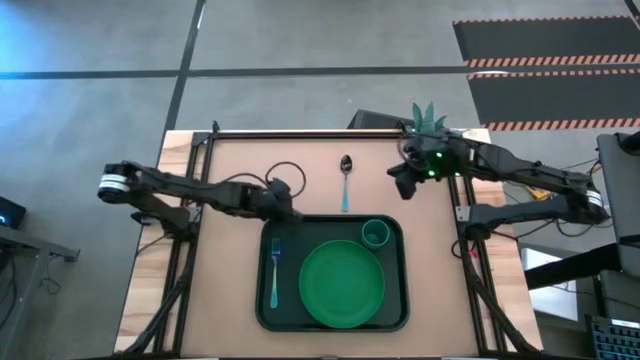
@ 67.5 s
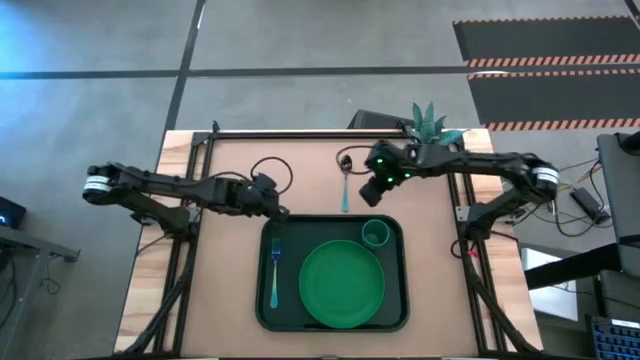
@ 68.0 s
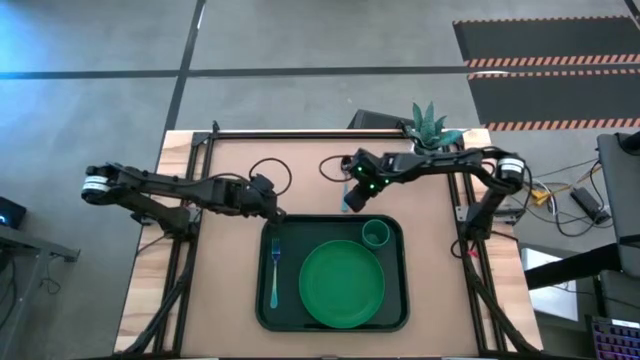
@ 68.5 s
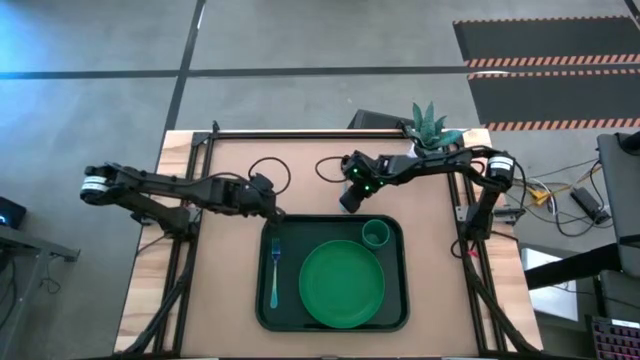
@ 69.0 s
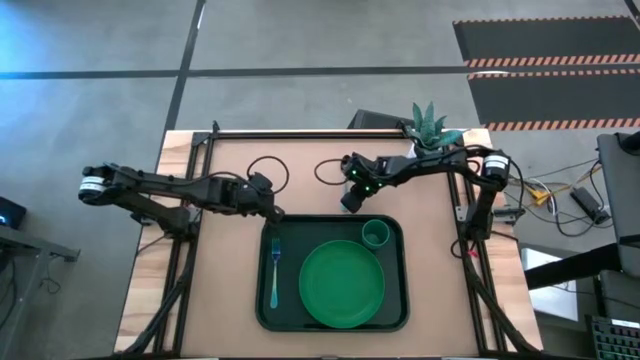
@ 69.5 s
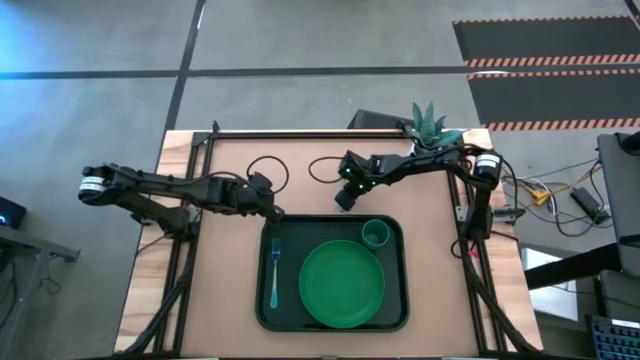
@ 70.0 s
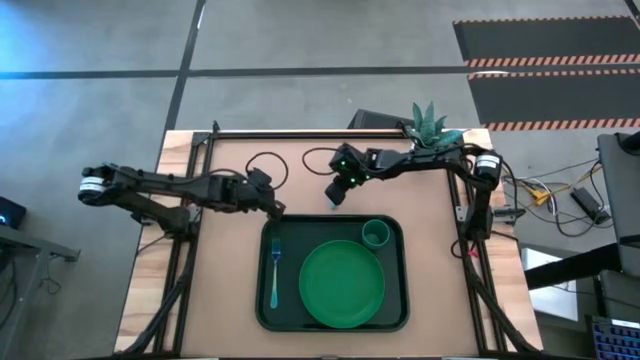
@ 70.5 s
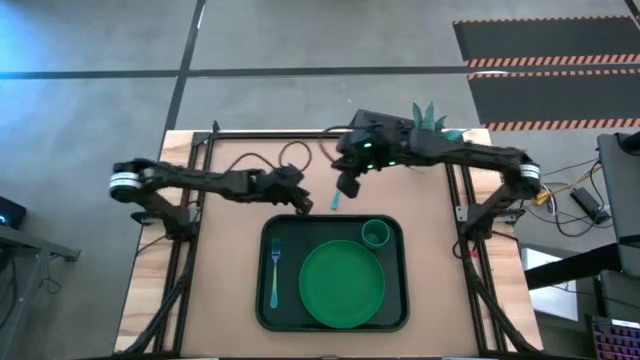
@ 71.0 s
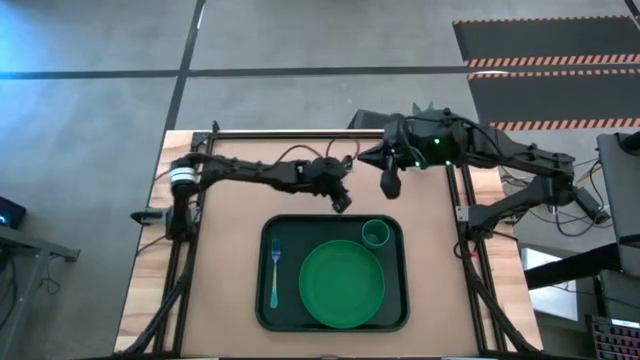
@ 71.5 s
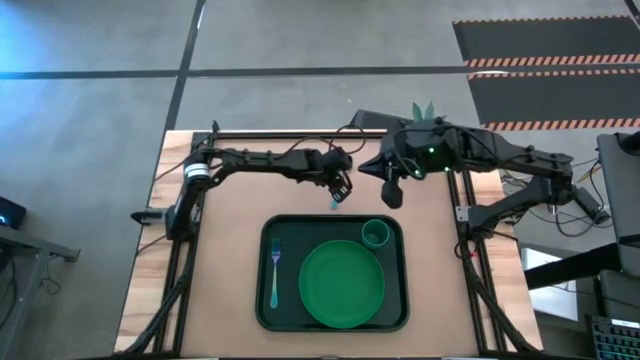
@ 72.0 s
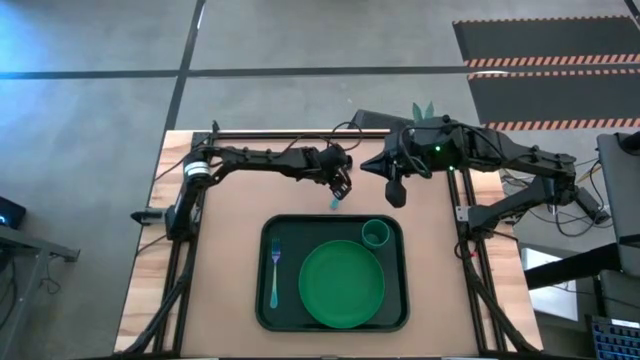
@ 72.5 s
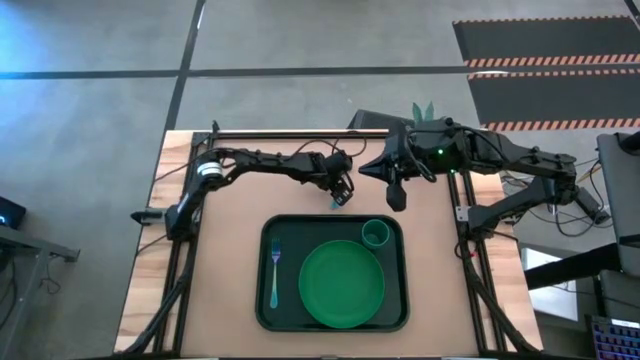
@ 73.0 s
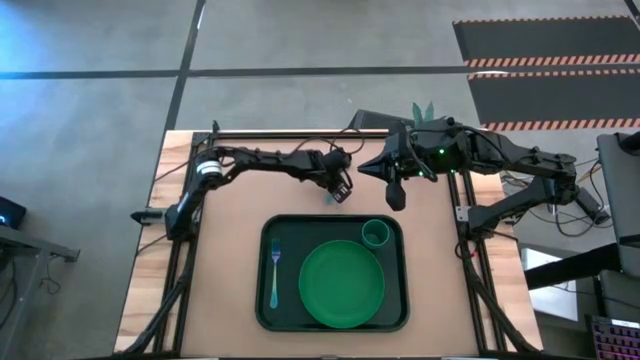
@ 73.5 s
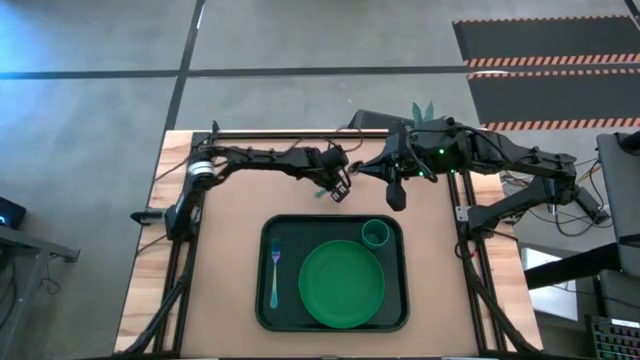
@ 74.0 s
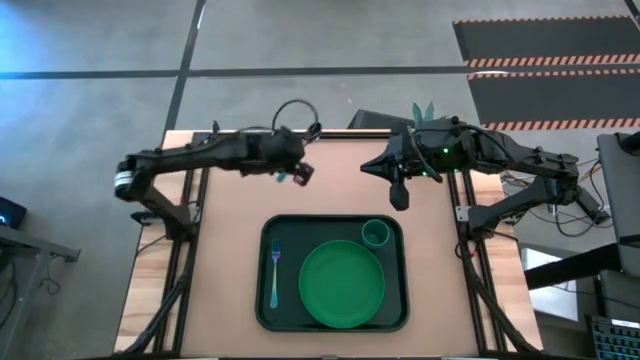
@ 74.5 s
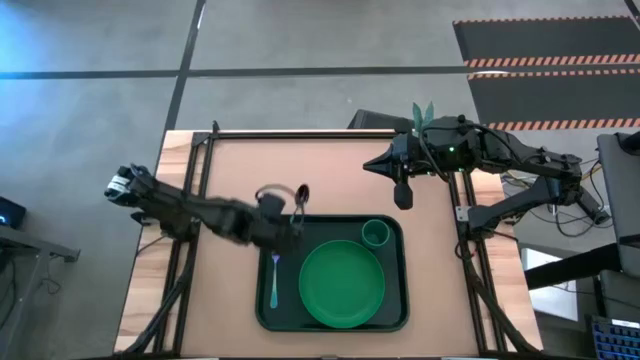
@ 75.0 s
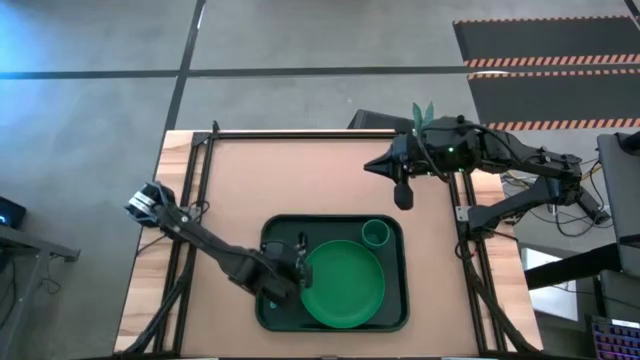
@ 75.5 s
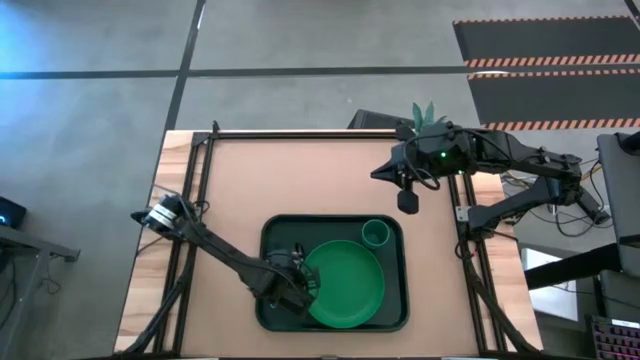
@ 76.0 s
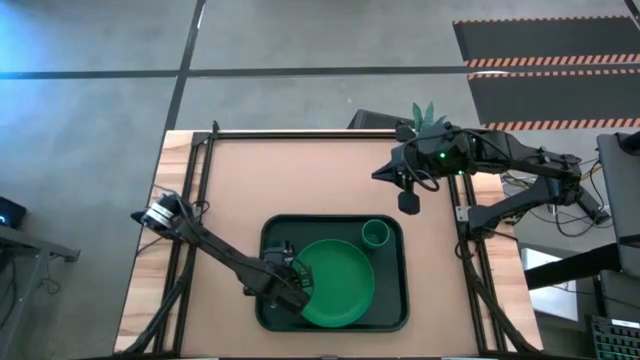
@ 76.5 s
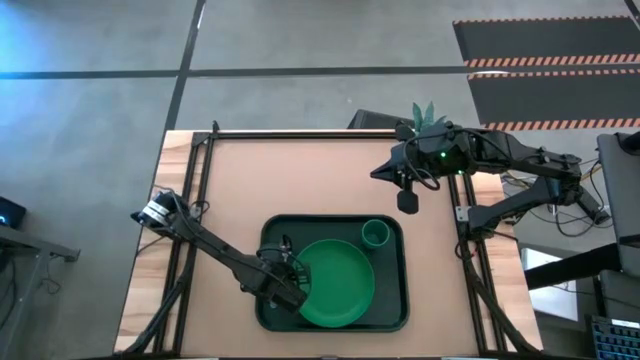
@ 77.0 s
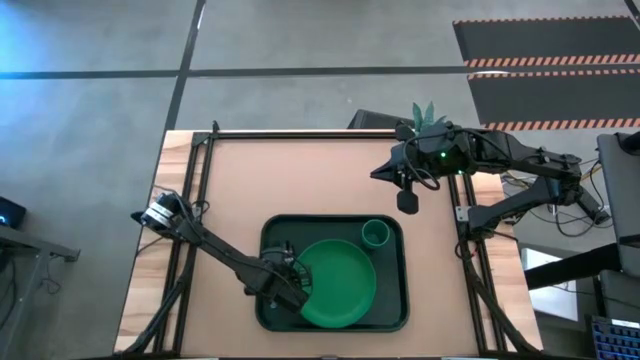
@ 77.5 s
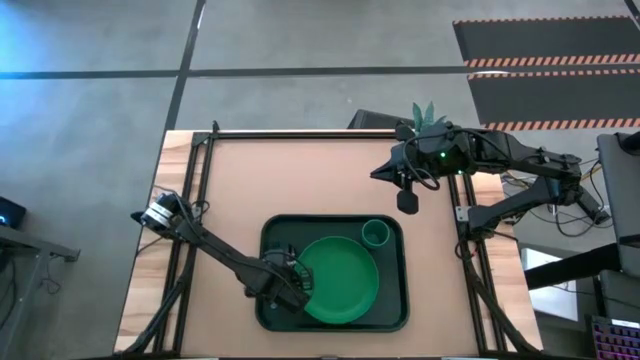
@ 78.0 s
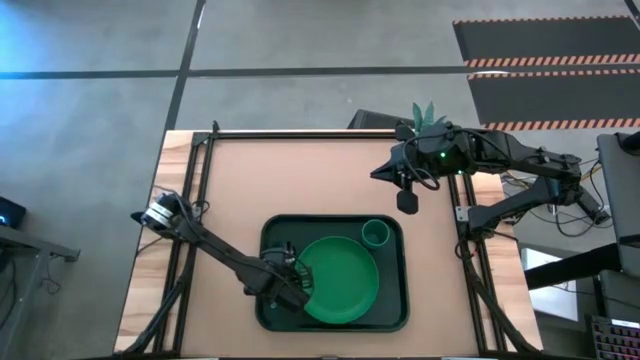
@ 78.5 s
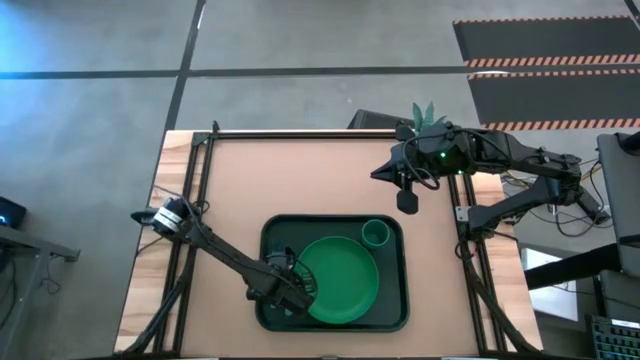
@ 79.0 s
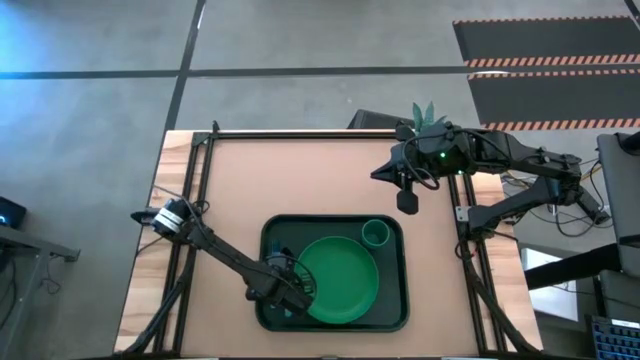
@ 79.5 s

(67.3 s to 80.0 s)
Task: Pick and place plate/cup/fork/spoon on tray
Put the blue spoon on the green tray to the right of the blue fork

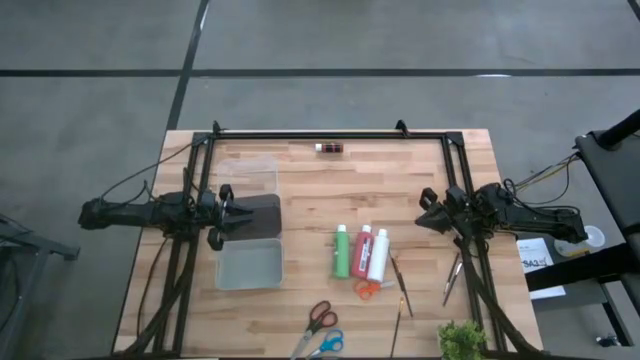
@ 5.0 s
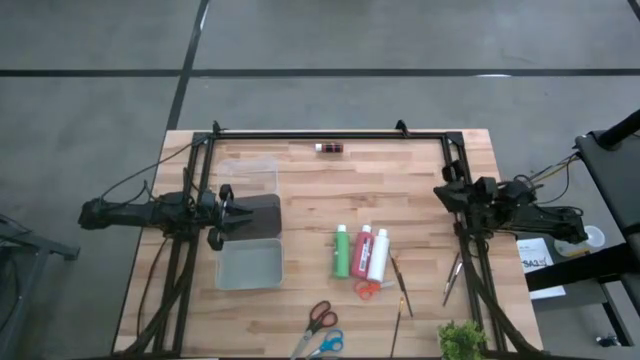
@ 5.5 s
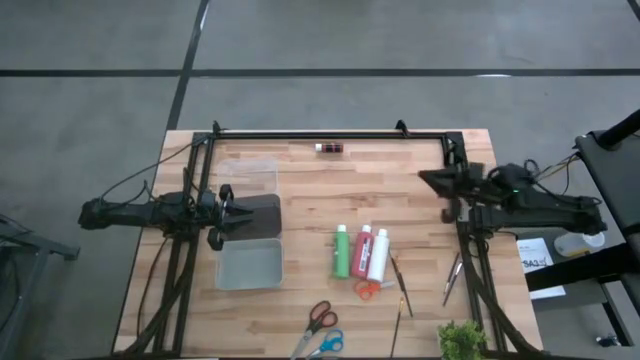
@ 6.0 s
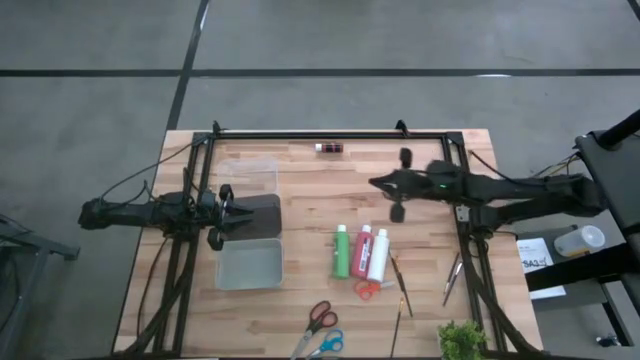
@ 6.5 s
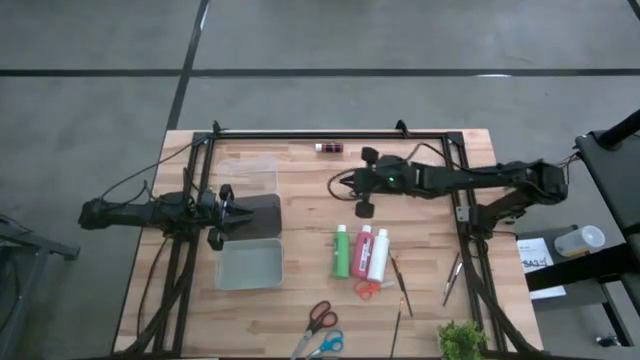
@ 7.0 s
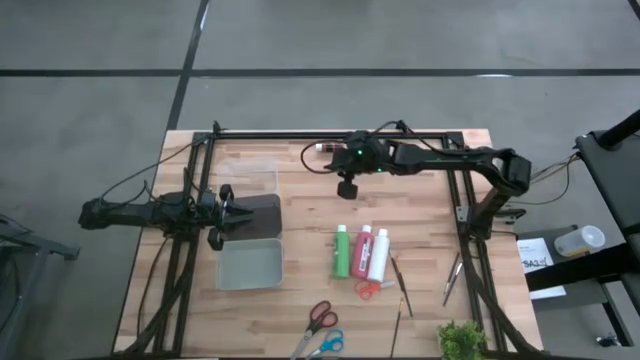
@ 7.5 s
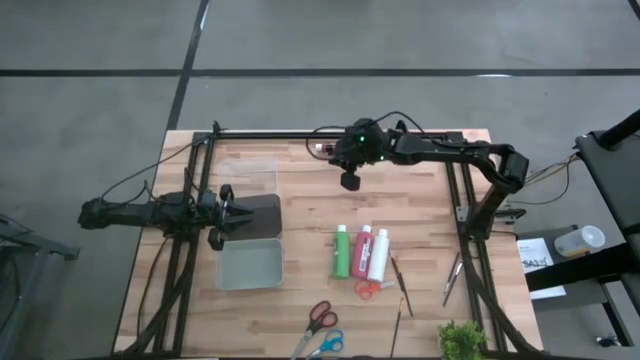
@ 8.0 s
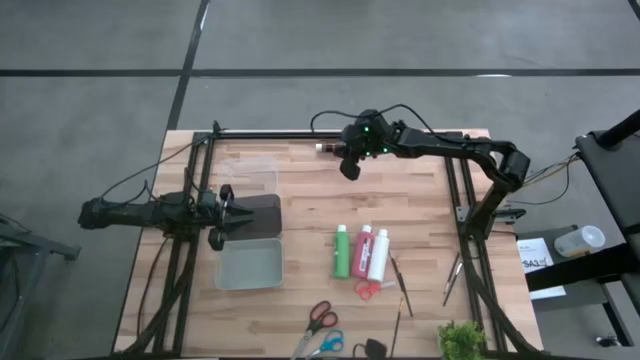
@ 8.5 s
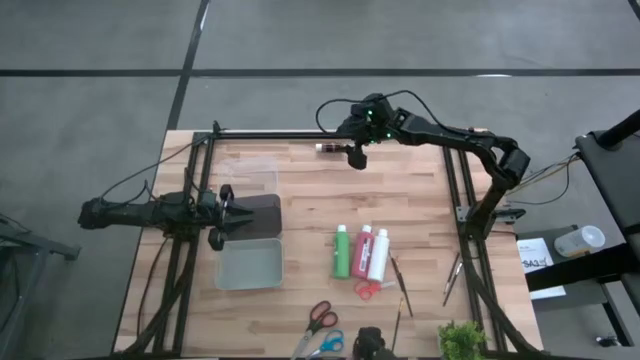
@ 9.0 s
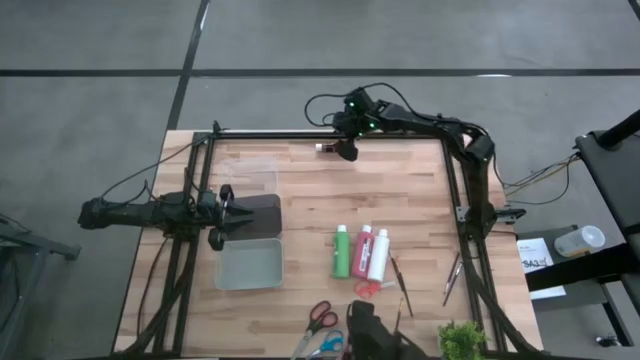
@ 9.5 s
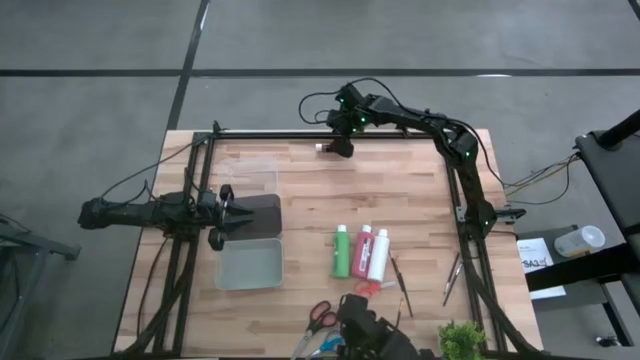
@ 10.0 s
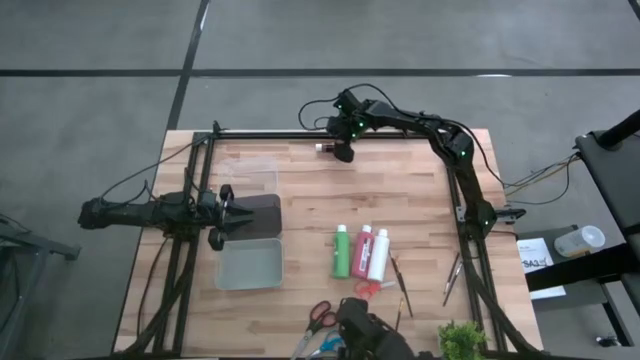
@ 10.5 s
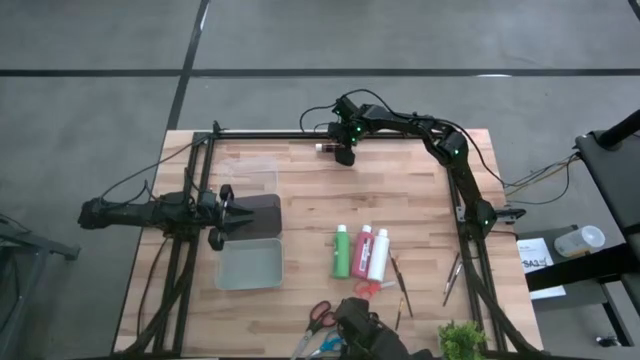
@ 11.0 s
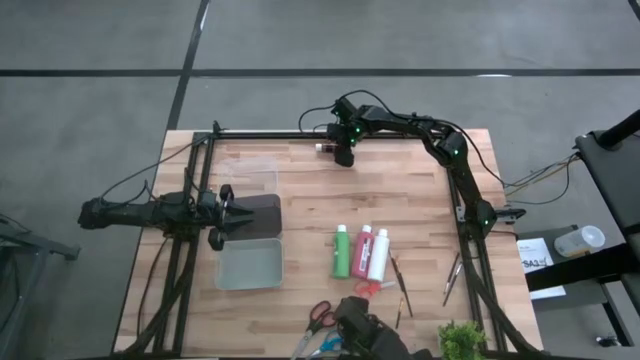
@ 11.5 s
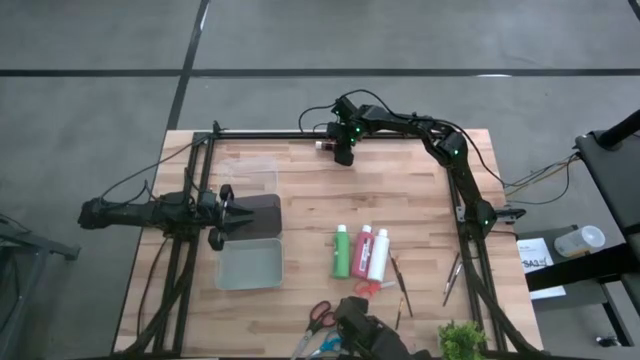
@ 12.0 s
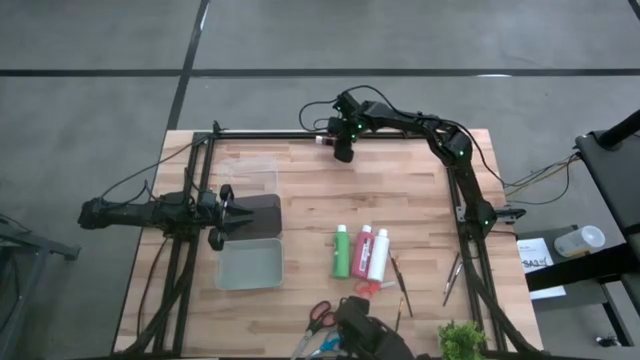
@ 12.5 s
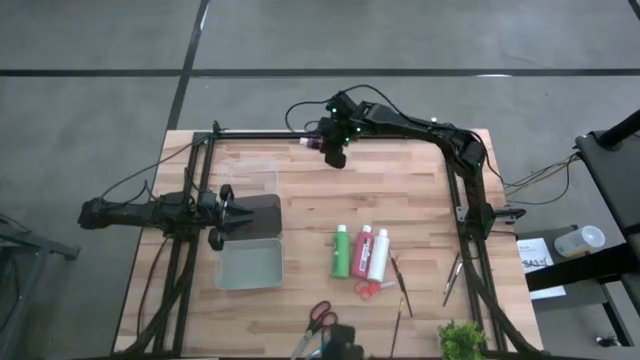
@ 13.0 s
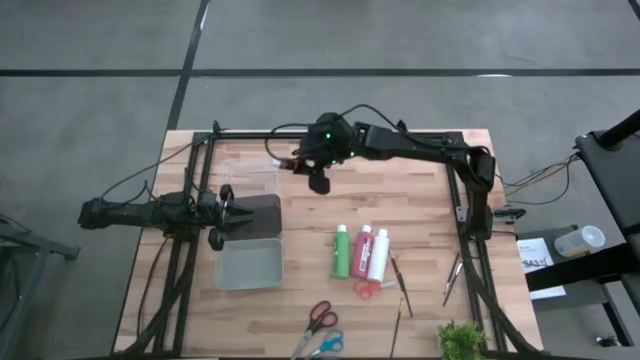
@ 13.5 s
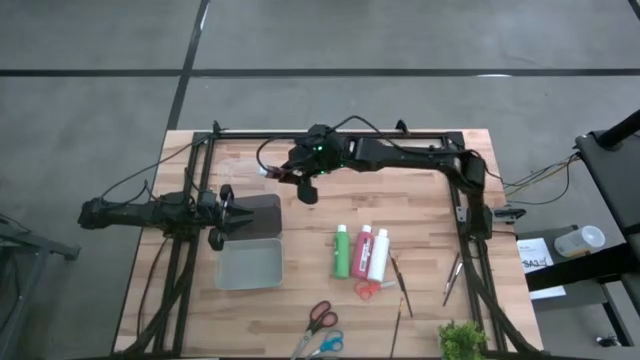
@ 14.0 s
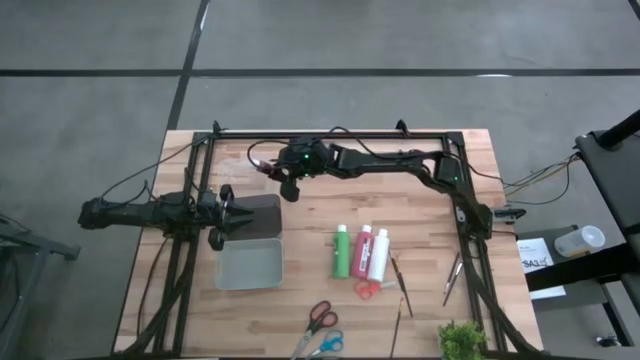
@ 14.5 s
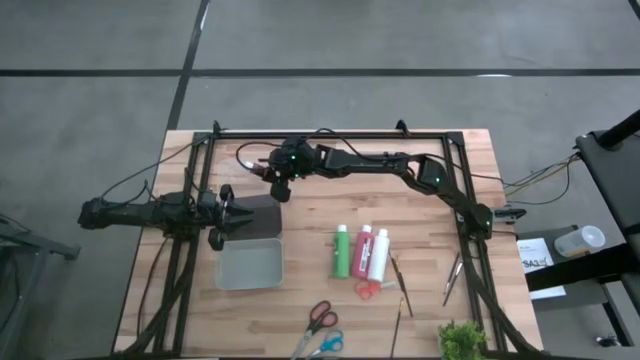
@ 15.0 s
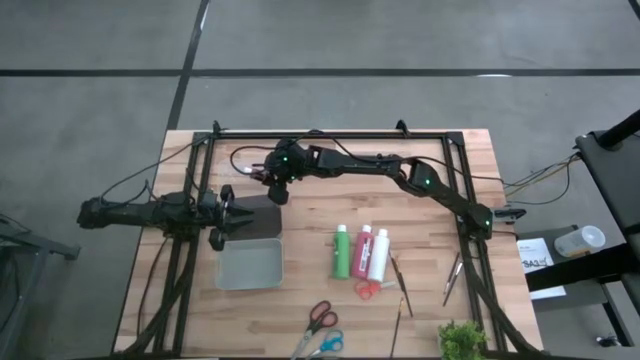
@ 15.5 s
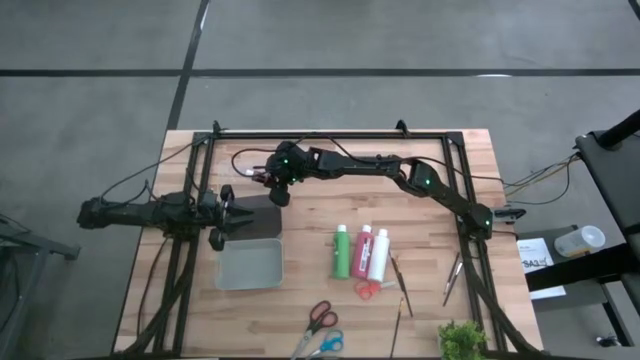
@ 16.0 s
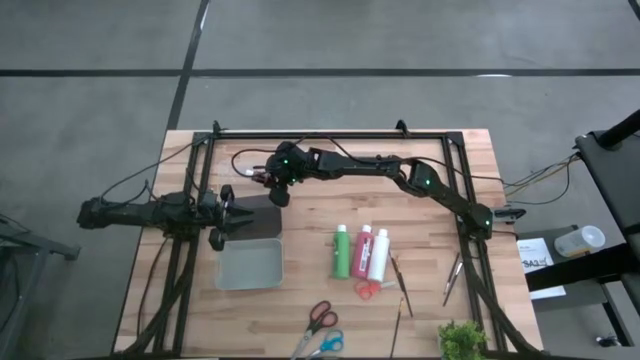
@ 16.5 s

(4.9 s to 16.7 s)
Task: Pick & Place Paint Supplies
Put the brown paint bottle into the transparent bin
